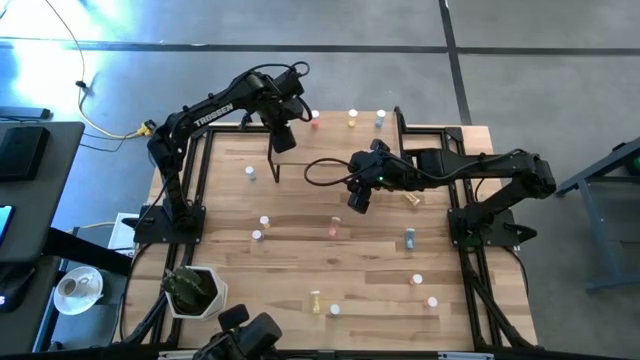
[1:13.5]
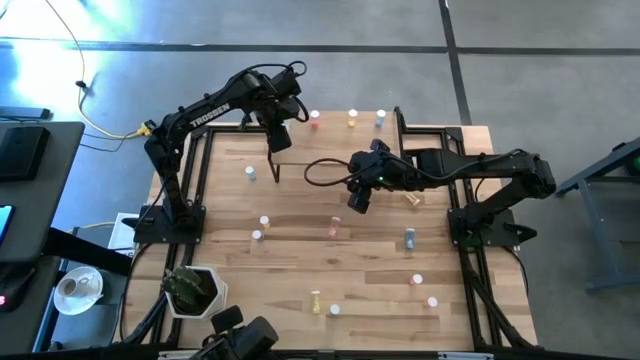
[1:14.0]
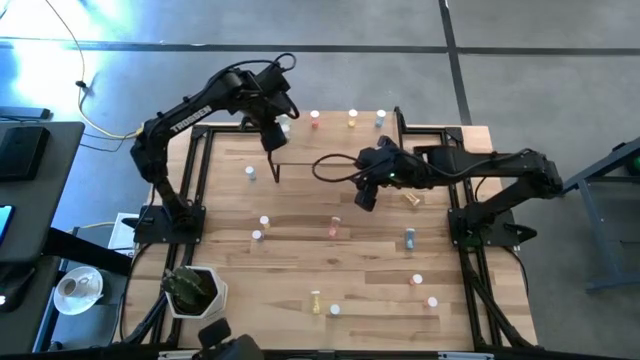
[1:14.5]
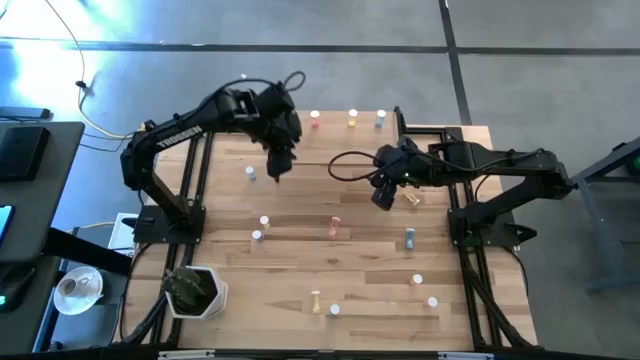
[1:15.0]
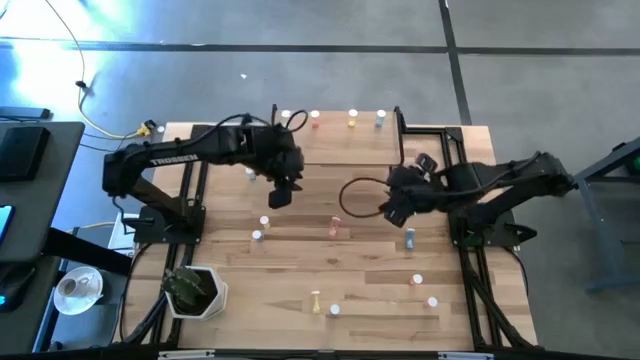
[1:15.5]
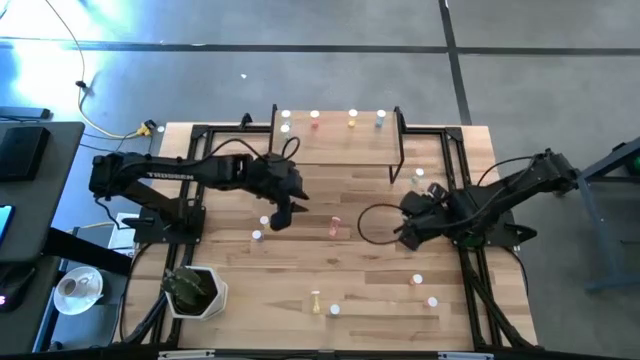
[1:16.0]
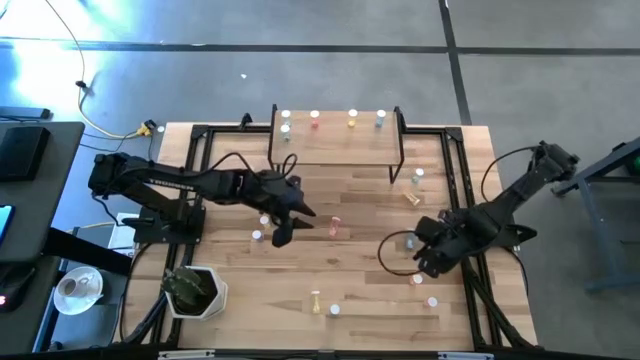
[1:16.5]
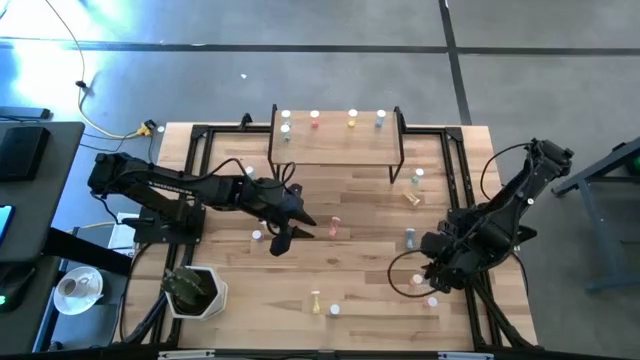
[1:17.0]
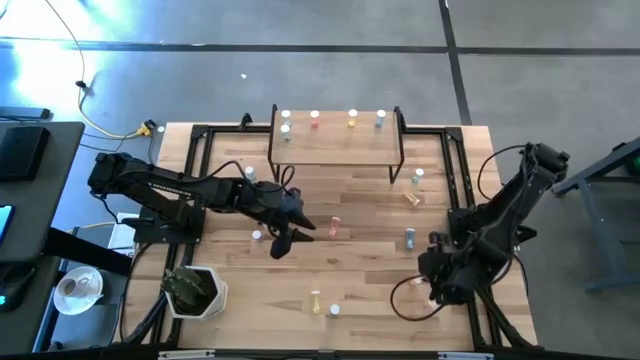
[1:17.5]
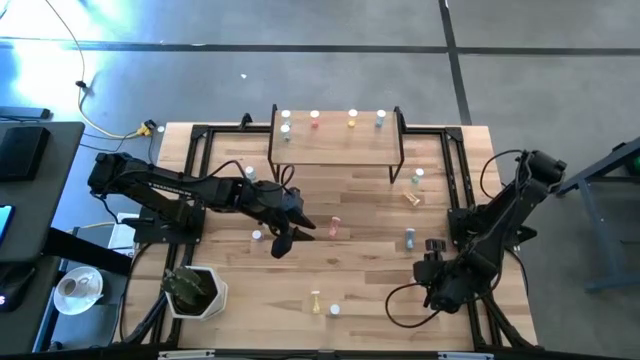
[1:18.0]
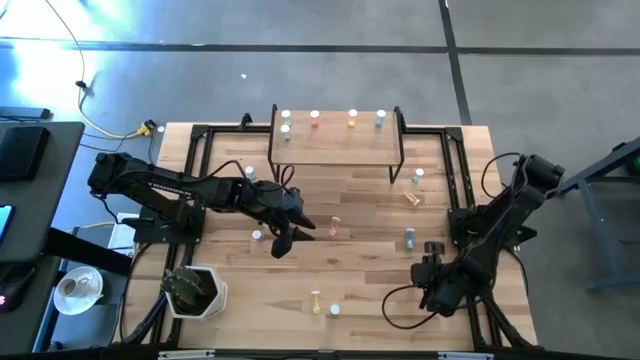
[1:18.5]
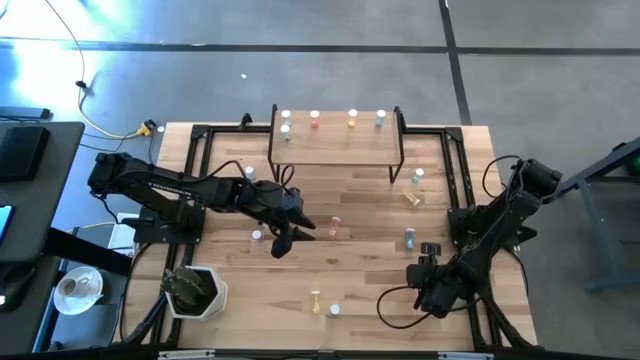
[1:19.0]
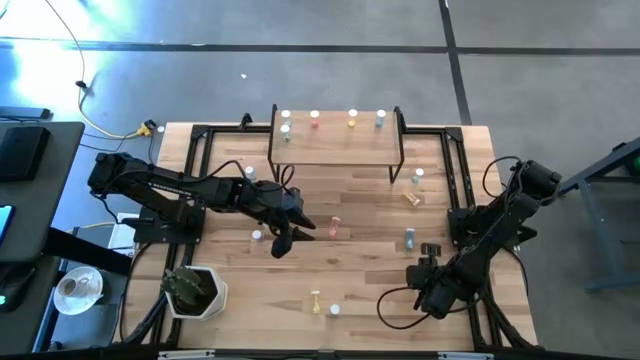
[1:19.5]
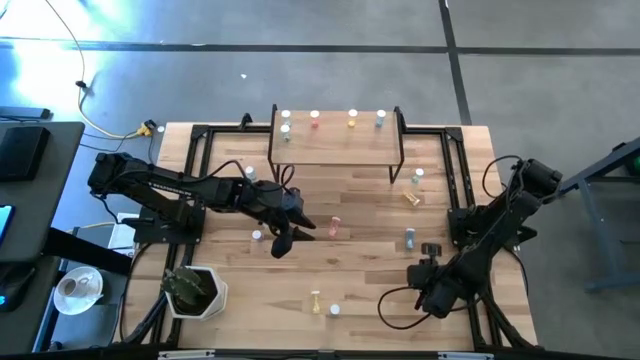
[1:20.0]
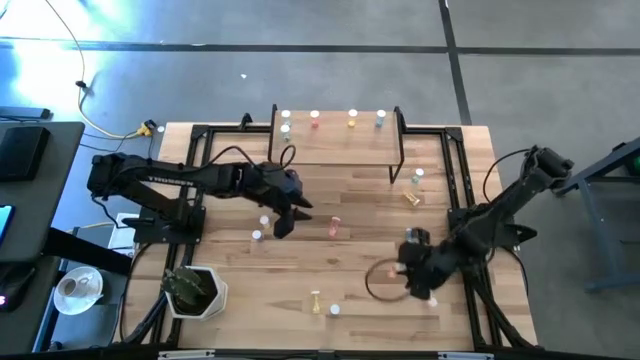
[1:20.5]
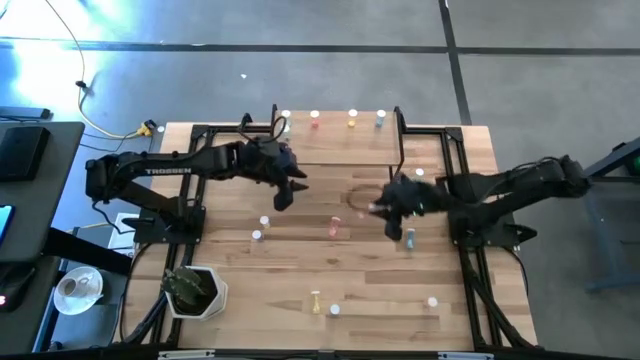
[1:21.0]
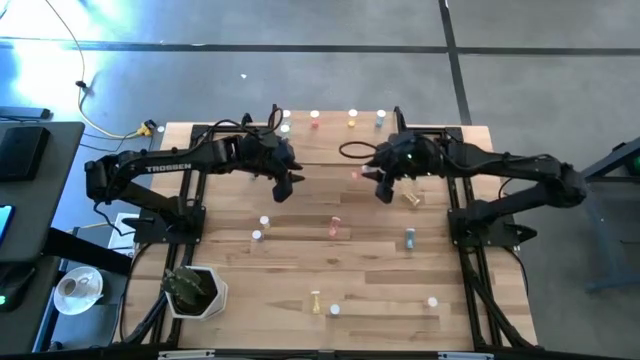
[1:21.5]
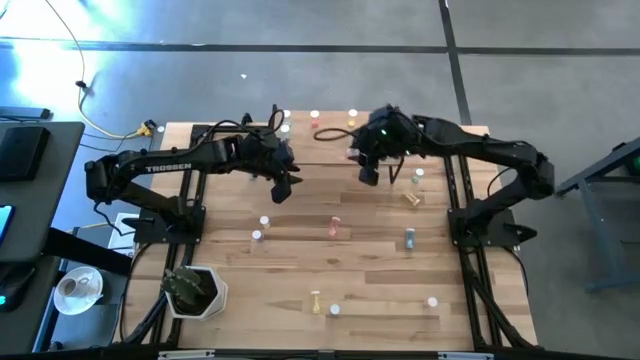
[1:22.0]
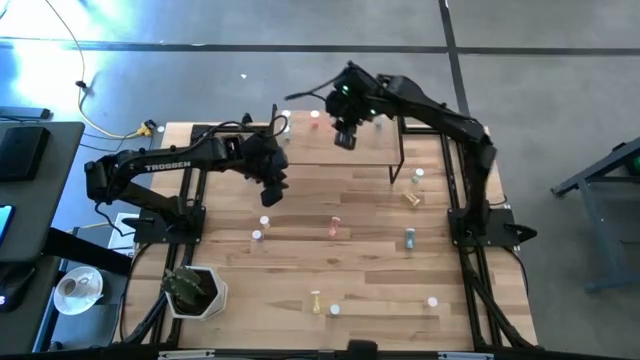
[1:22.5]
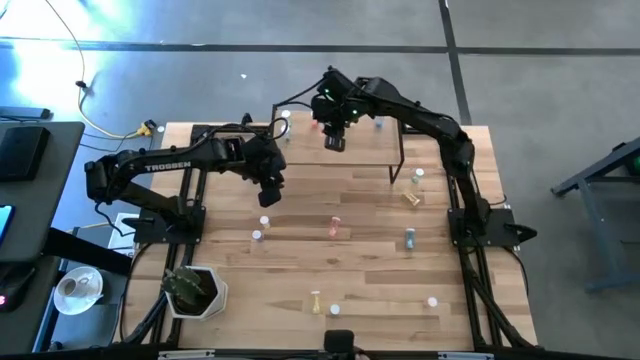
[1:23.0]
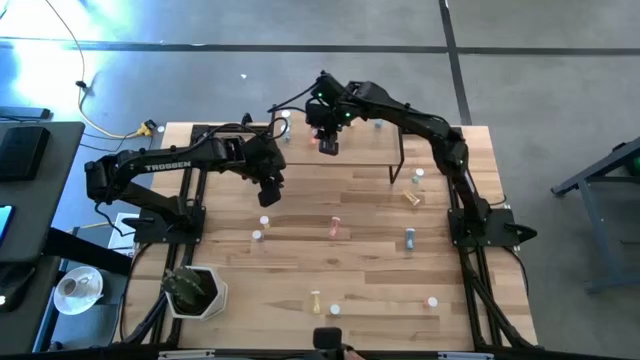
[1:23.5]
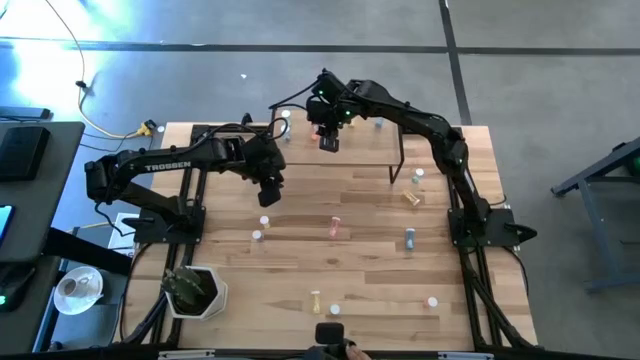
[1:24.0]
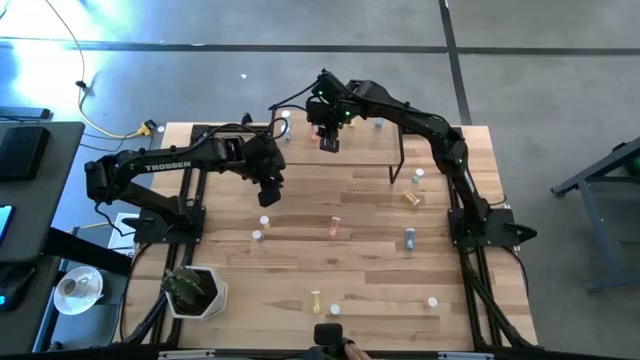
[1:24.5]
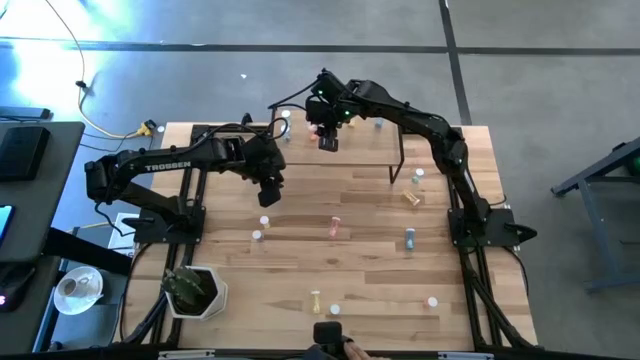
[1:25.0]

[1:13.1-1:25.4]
Task: Pick and place medicine bottles onto shelf by color
Put the pink pill bottle on the shelf

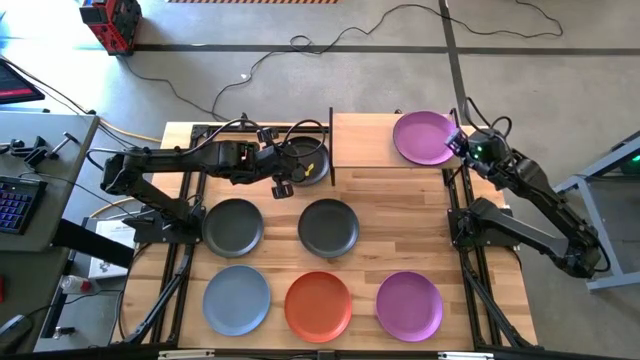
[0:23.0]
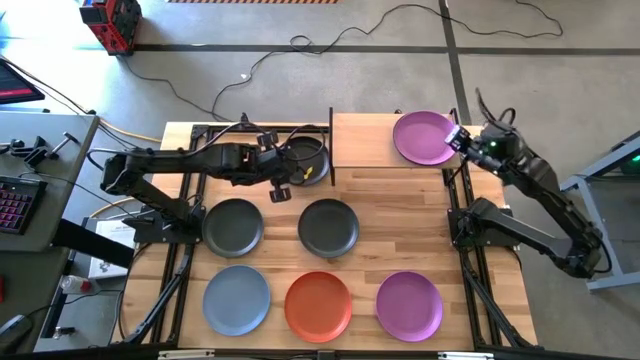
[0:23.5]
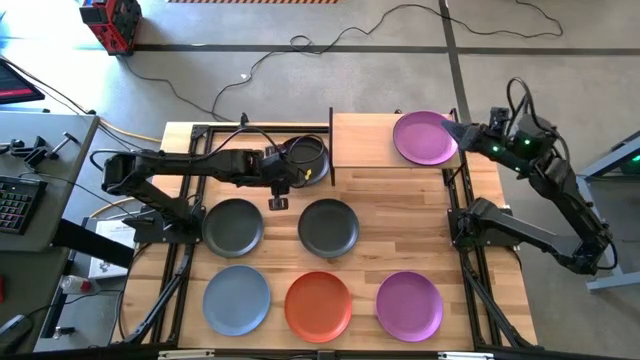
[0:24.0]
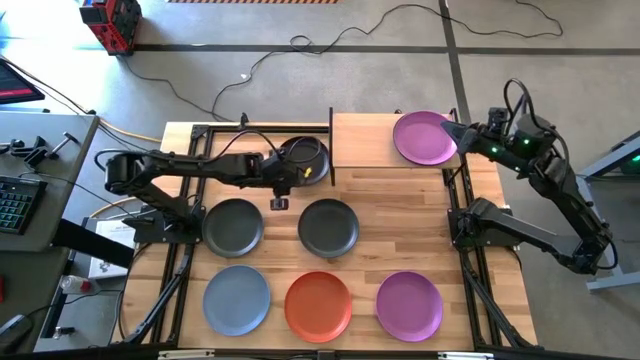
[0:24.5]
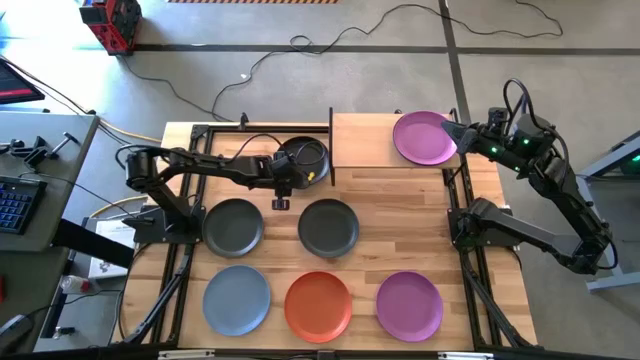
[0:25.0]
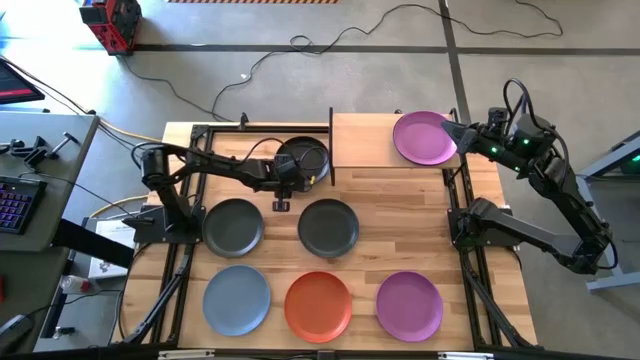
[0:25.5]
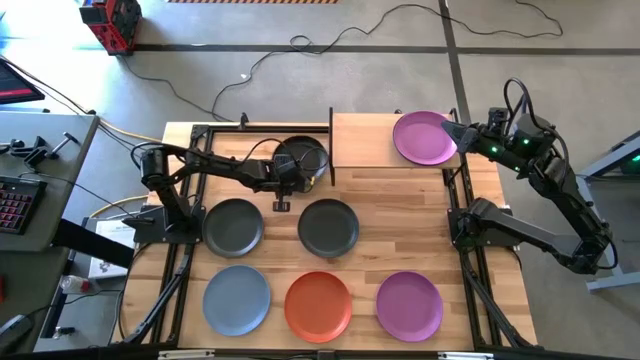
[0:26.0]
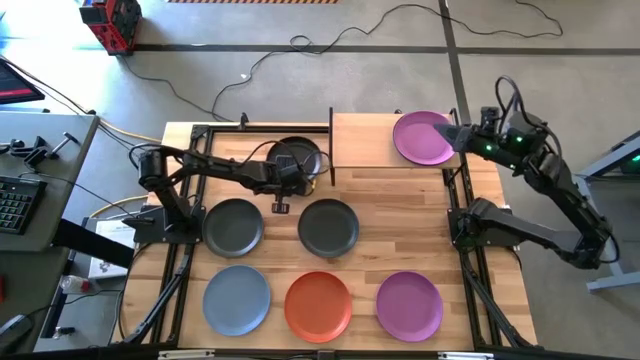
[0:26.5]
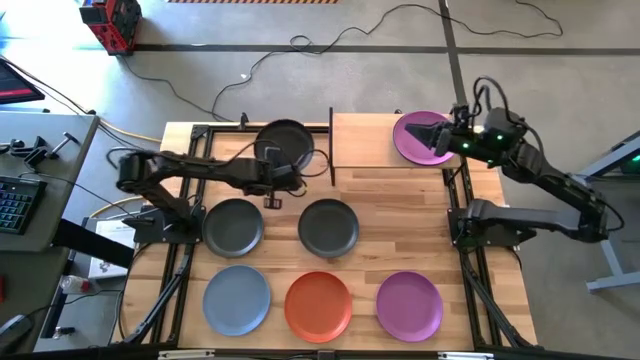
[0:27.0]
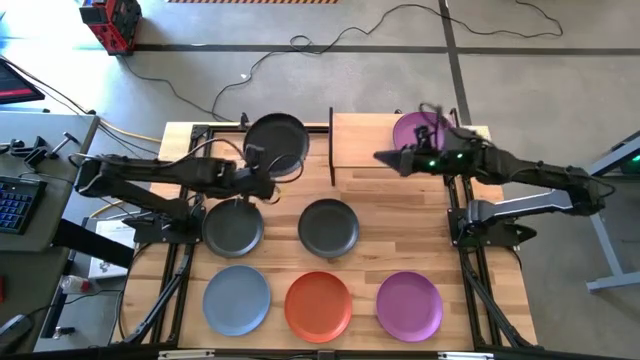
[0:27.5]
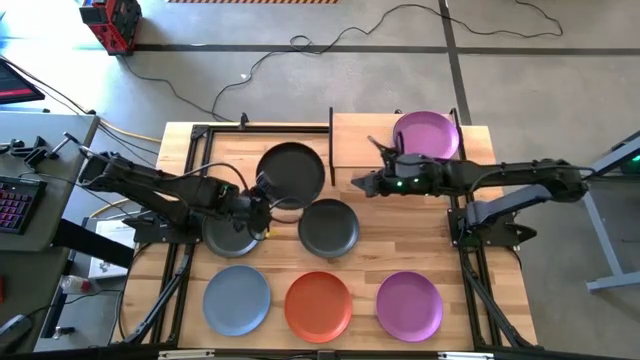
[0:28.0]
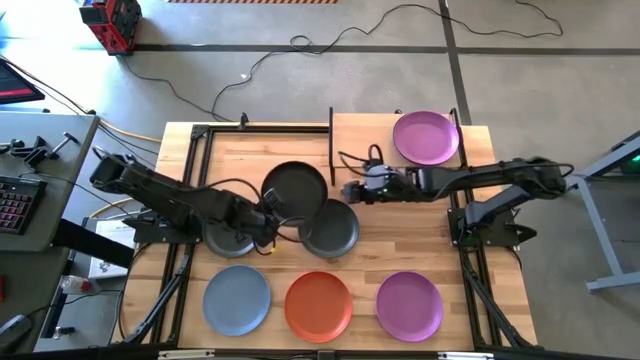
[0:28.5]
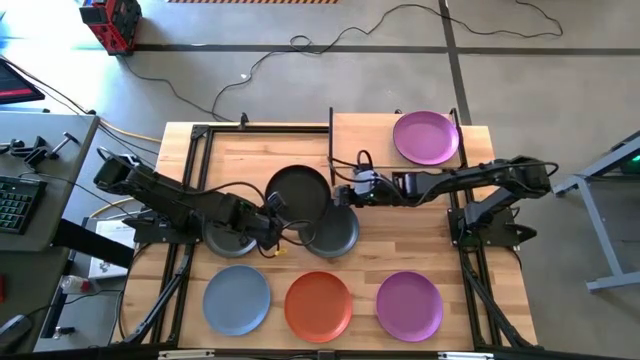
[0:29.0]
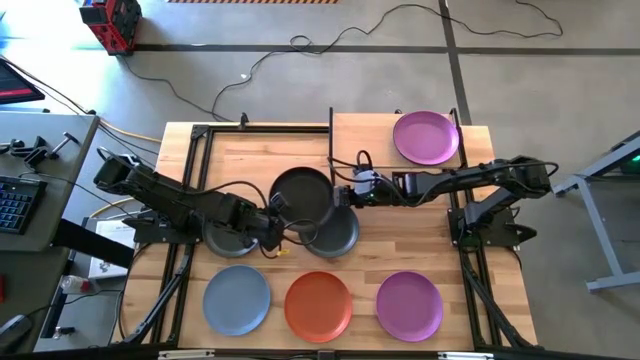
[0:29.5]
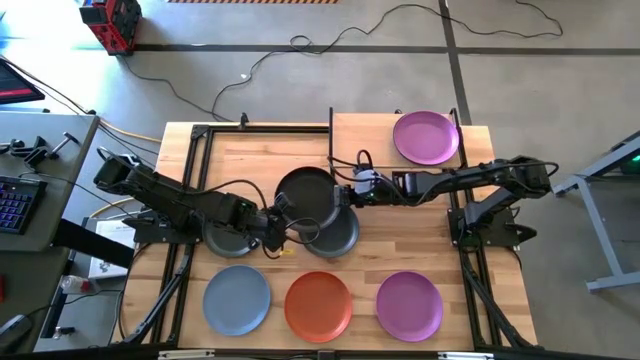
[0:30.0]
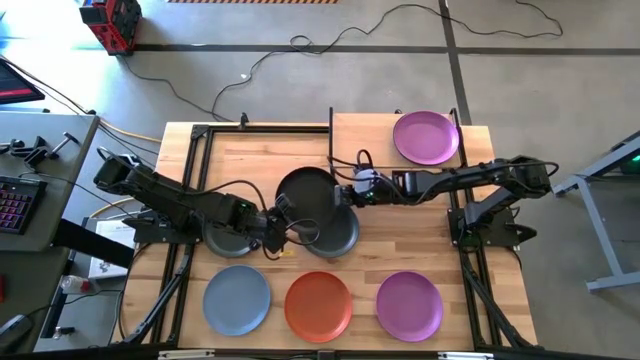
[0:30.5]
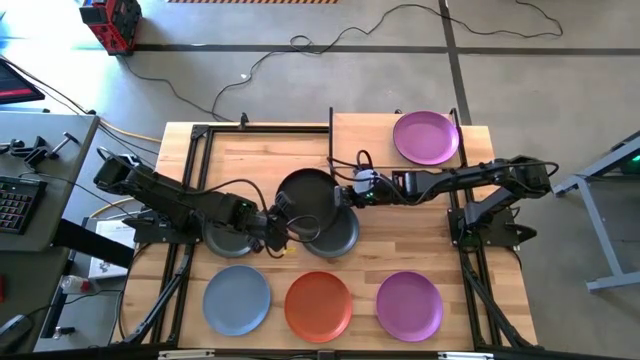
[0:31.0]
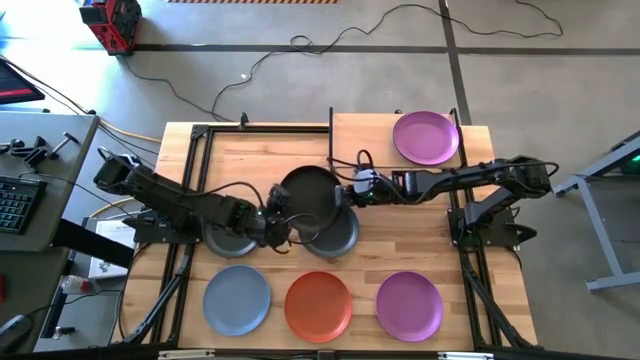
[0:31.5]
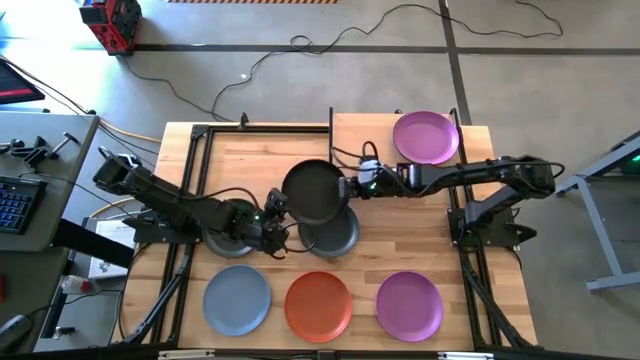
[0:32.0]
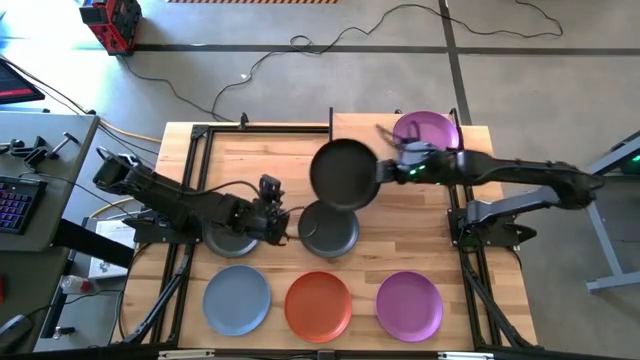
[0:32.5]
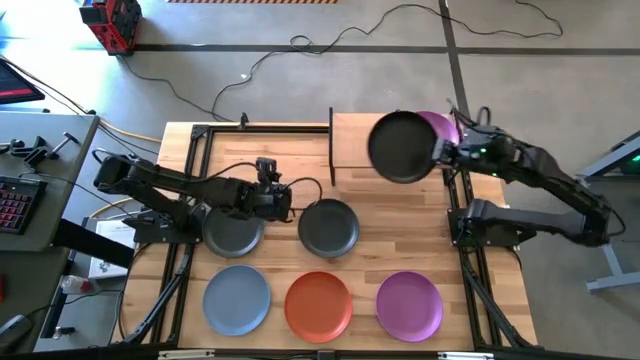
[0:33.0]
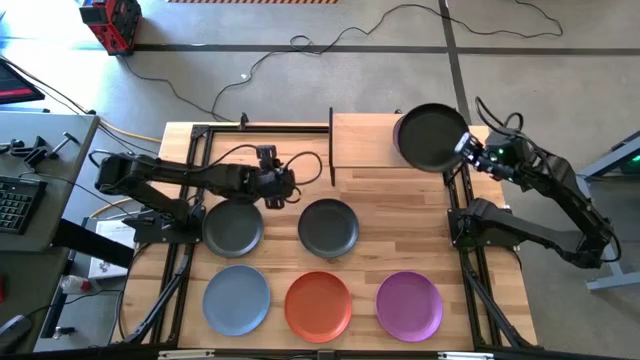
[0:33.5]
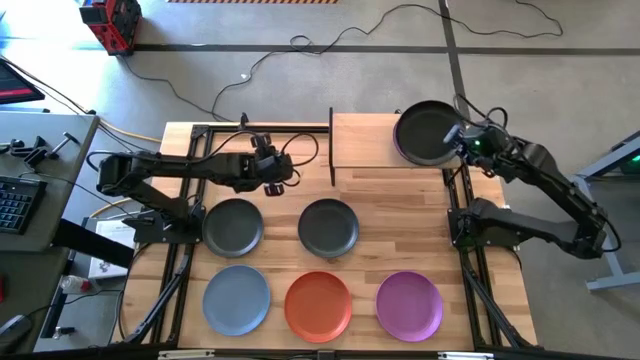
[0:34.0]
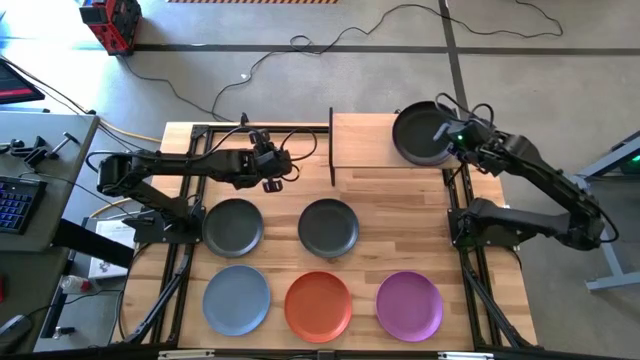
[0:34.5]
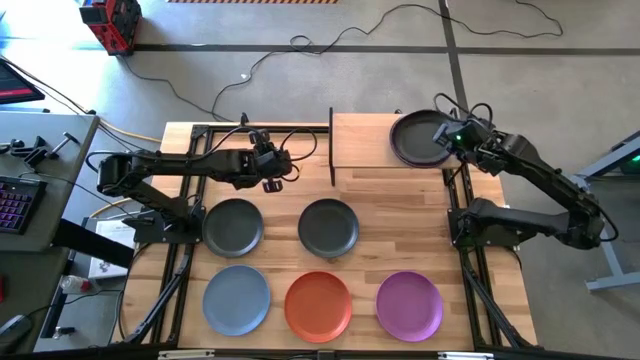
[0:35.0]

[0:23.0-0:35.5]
Task: Place and stack plates onto a shelf
Stack the black plate on top of the purple plate on the shelf
